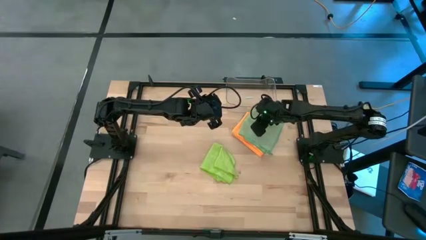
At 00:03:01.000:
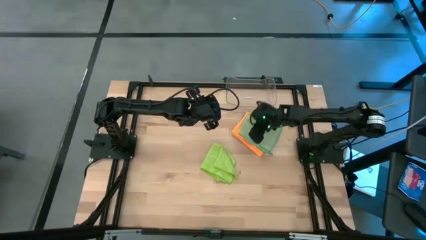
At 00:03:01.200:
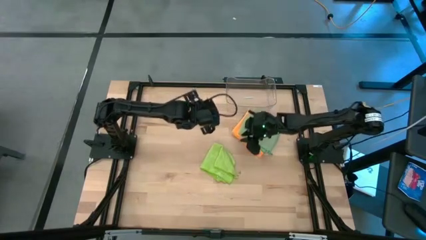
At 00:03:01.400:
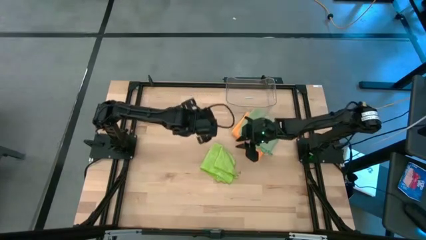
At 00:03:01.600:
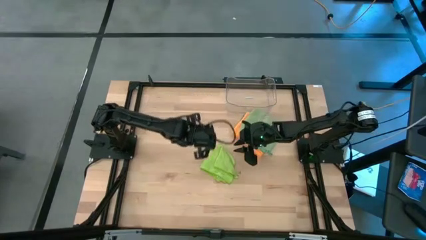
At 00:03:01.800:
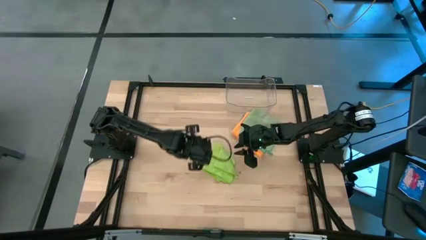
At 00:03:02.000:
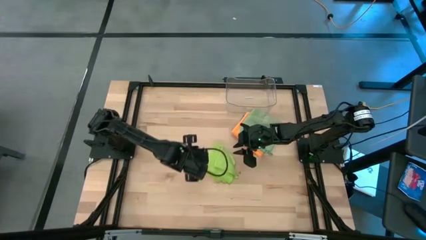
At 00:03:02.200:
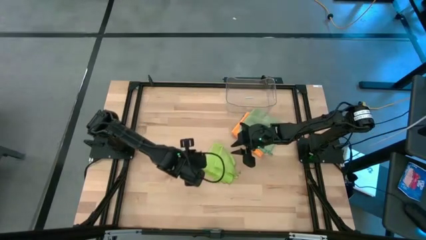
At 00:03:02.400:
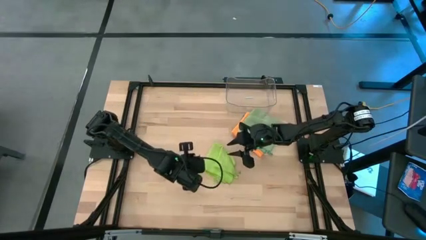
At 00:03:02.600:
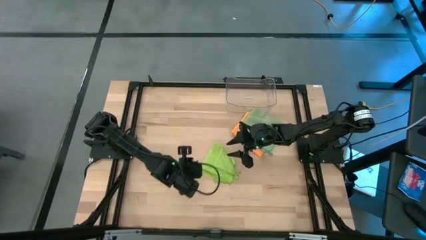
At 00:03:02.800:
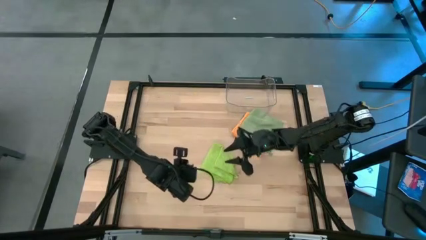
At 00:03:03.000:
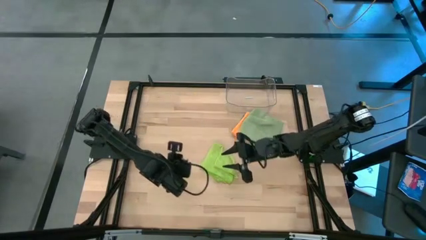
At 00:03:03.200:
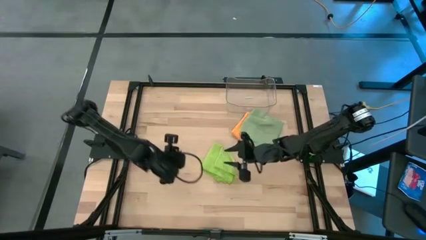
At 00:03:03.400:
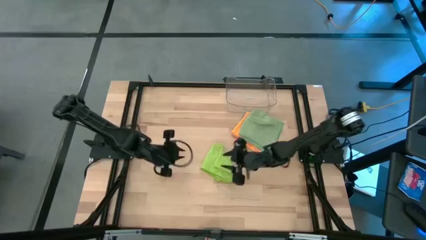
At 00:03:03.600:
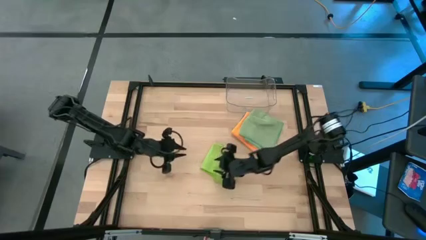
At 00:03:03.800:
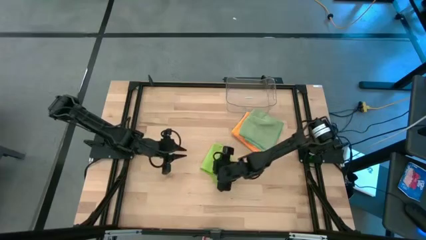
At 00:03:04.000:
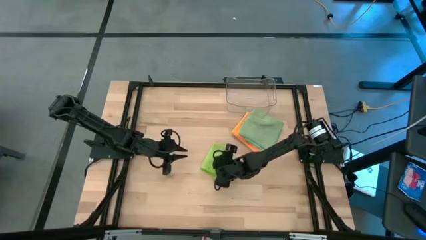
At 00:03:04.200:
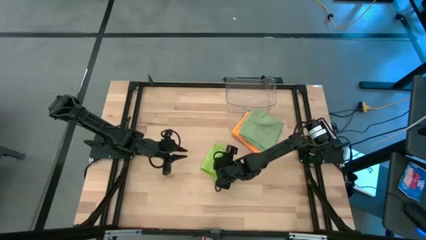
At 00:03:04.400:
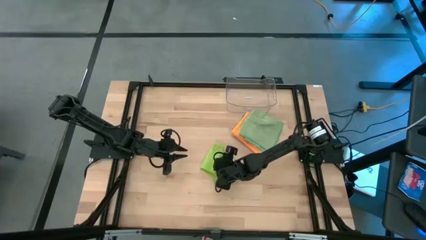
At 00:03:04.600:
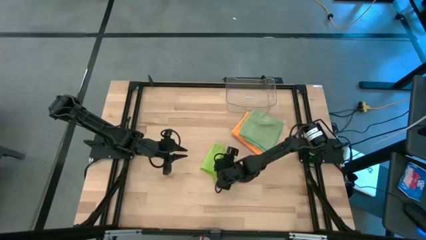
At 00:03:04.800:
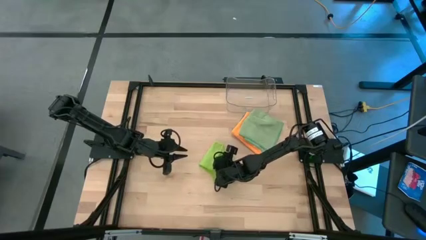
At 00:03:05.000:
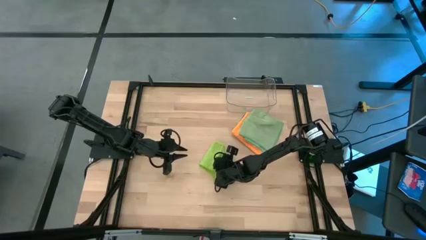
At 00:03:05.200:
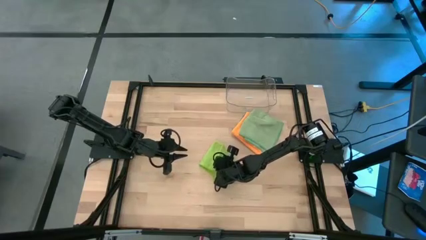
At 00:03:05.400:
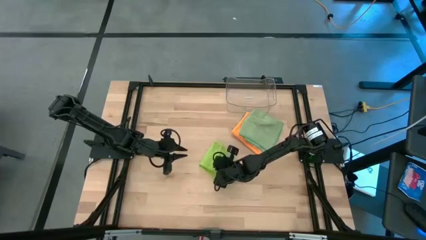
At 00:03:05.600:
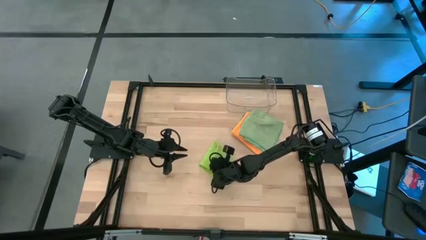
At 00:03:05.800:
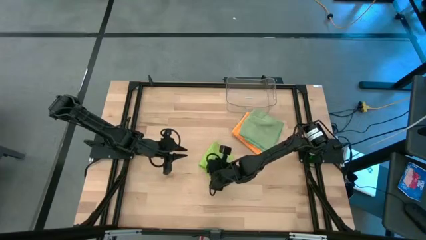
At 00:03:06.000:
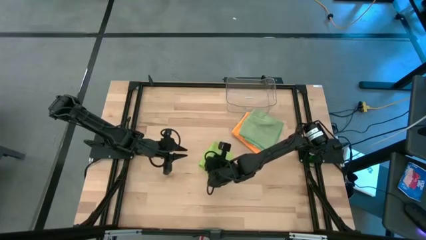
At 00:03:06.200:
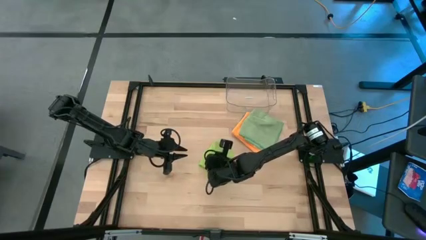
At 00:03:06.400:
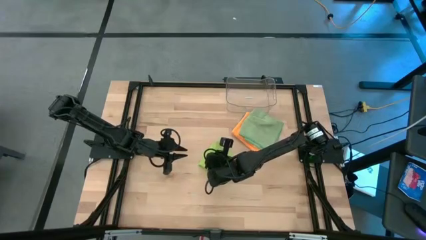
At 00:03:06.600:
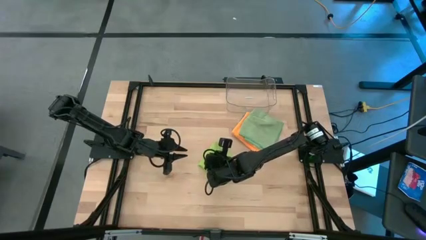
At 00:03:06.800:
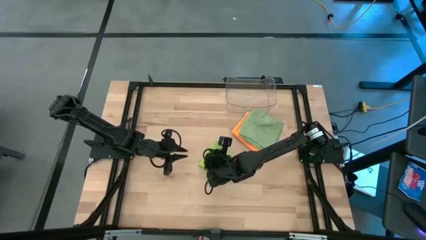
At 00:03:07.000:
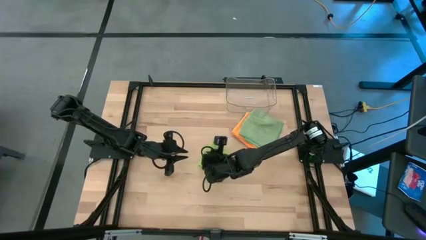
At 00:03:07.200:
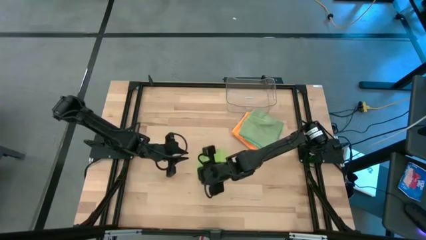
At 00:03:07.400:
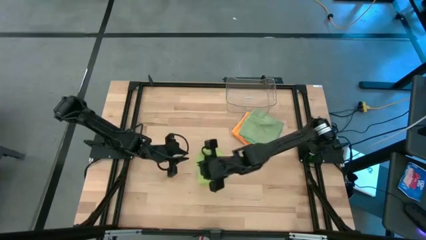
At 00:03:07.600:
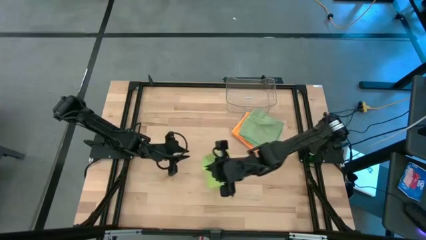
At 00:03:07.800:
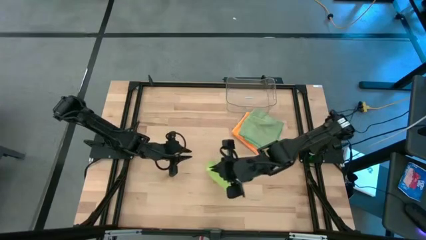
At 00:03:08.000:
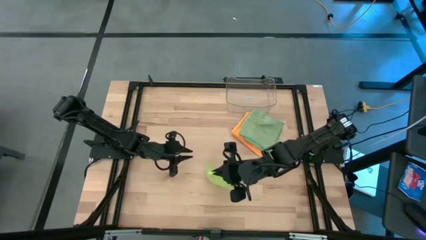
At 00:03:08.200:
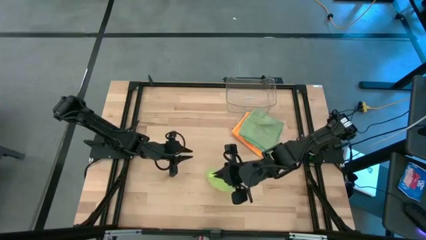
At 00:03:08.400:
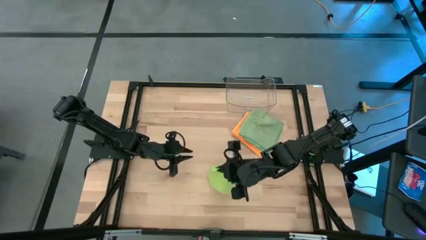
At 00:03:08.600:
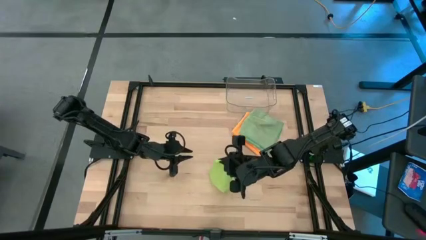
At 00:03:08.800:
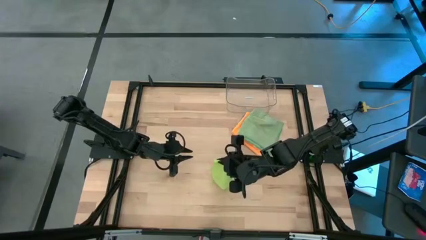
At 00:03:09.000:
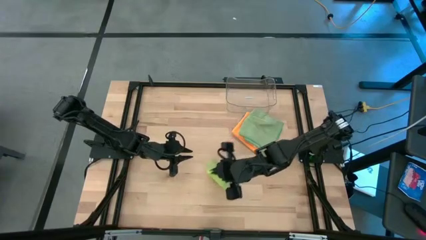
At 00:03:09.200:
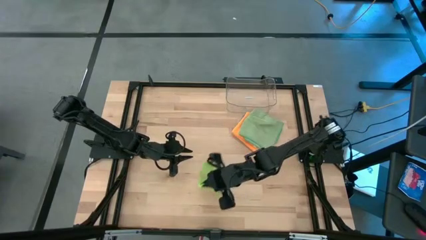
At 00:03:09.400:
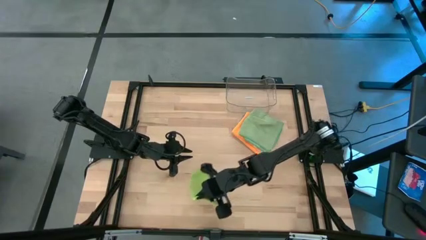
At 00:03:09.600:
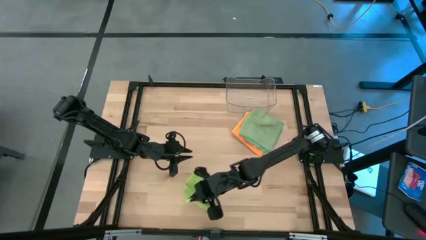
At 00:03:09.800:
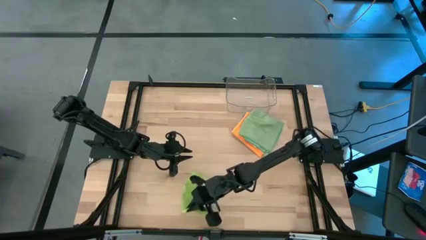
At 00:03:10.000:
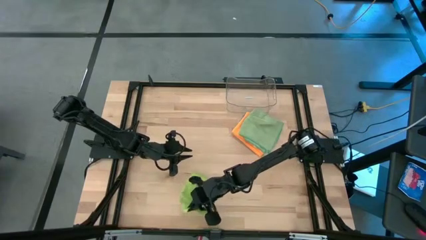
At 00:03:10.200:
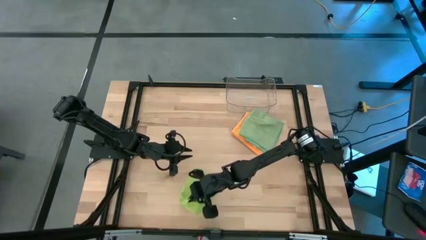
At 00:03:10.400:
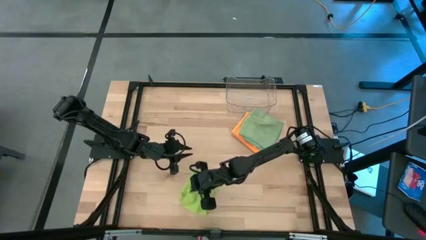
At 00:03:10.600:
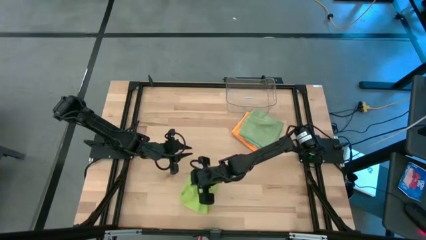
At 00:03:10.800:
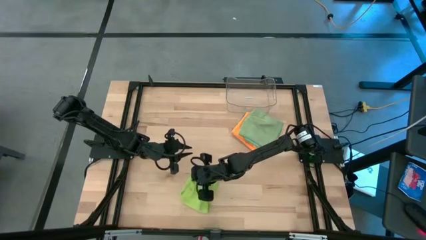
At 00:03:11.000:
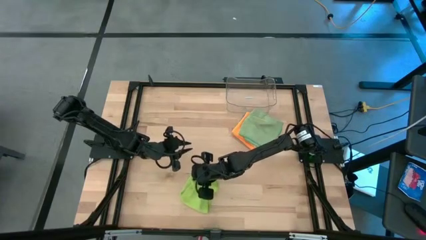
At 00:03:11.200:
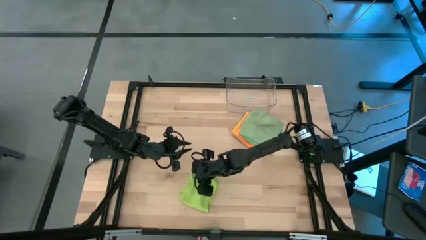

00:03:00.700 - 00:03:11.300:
Task: Fold microfiber towels
Fold the light green microfiber cloth

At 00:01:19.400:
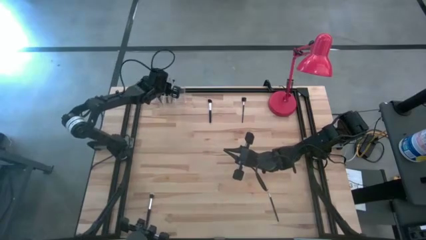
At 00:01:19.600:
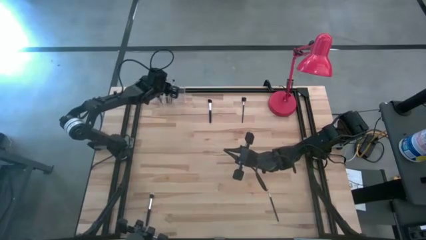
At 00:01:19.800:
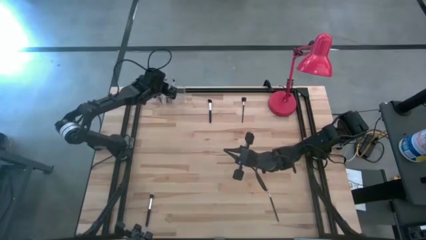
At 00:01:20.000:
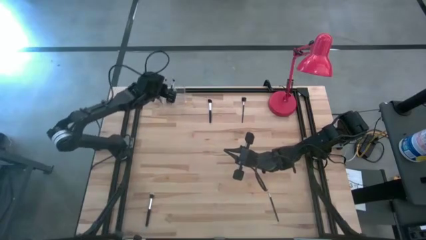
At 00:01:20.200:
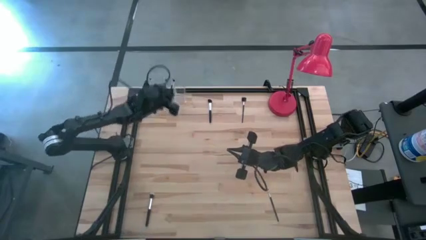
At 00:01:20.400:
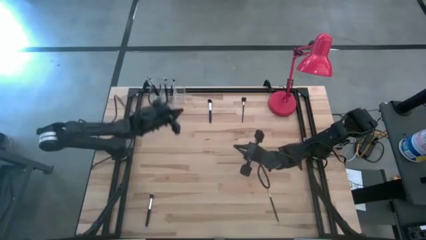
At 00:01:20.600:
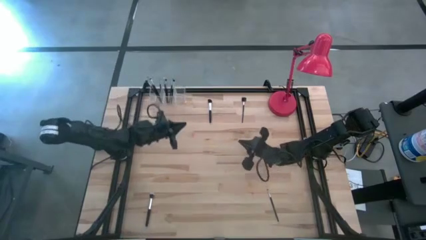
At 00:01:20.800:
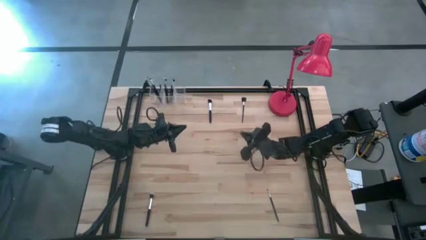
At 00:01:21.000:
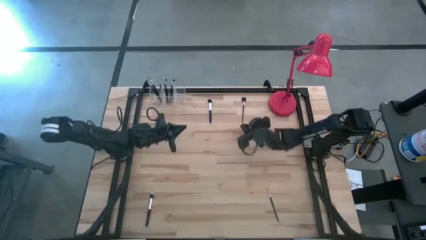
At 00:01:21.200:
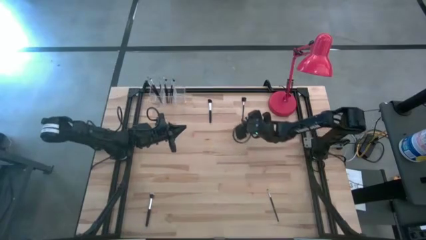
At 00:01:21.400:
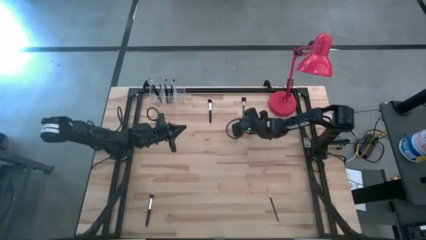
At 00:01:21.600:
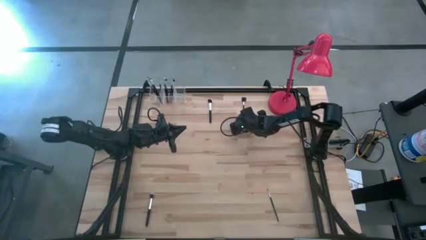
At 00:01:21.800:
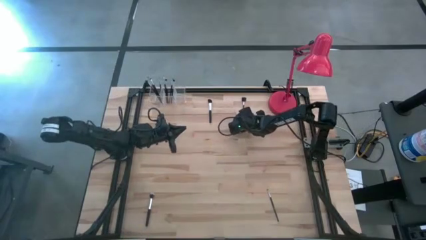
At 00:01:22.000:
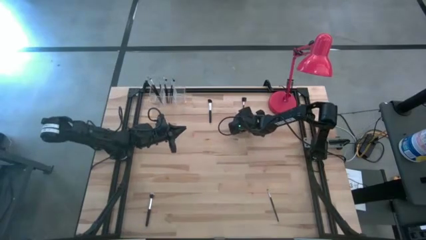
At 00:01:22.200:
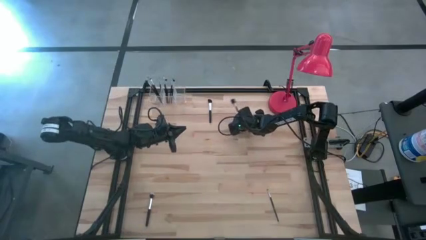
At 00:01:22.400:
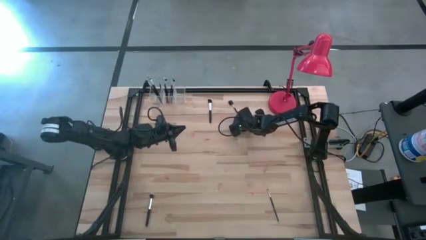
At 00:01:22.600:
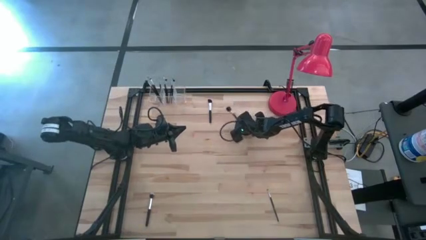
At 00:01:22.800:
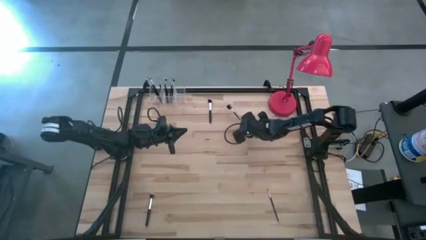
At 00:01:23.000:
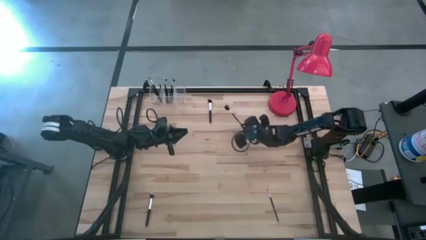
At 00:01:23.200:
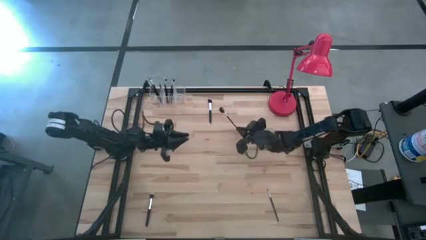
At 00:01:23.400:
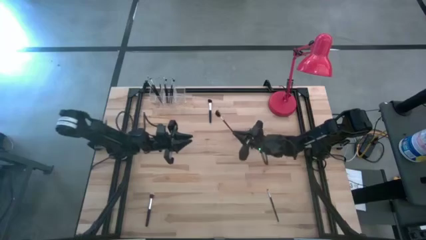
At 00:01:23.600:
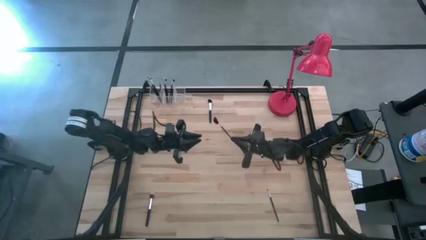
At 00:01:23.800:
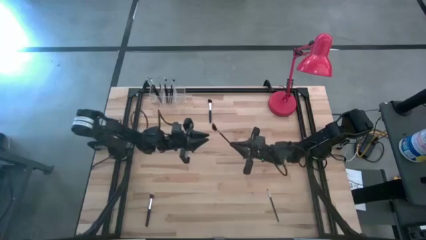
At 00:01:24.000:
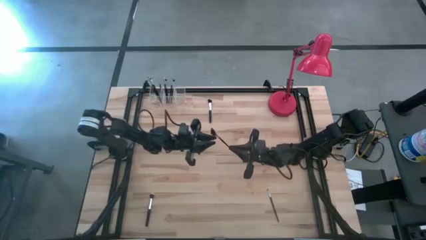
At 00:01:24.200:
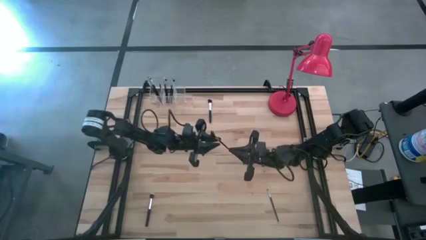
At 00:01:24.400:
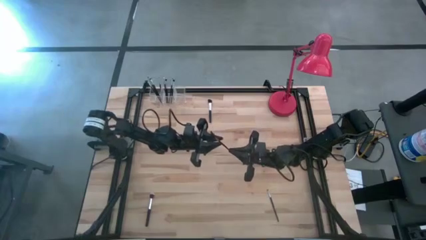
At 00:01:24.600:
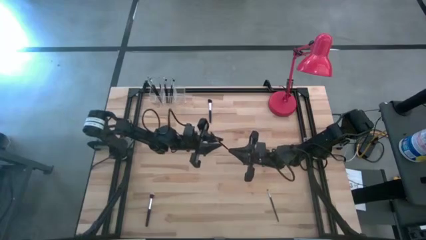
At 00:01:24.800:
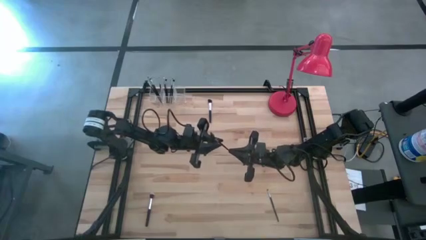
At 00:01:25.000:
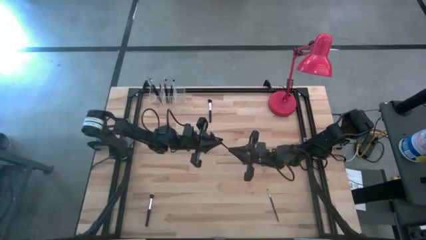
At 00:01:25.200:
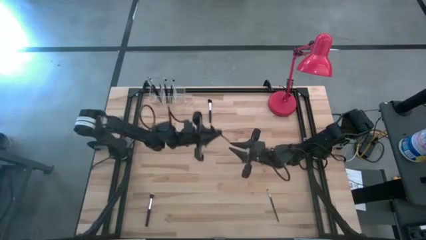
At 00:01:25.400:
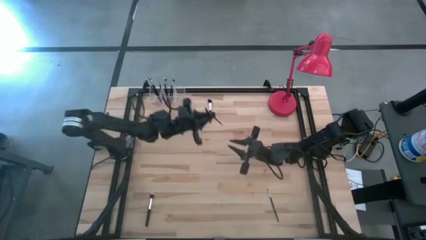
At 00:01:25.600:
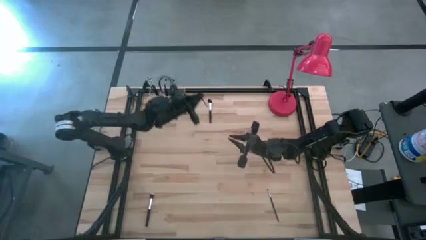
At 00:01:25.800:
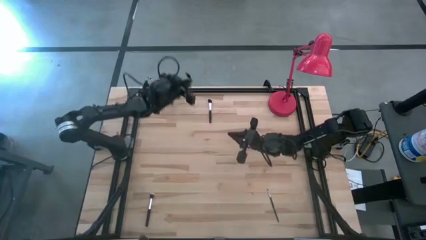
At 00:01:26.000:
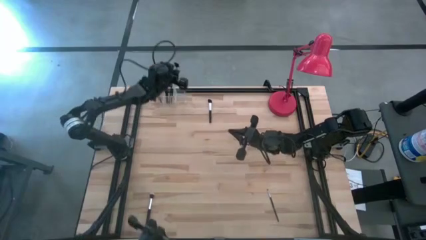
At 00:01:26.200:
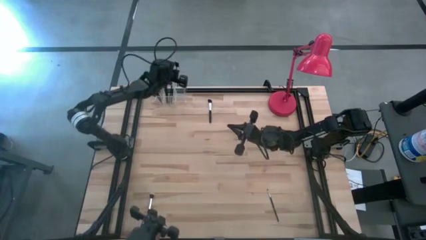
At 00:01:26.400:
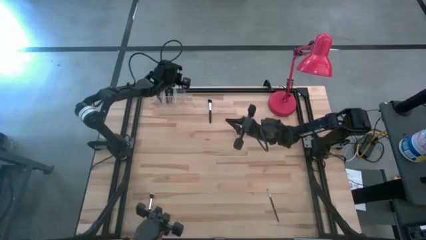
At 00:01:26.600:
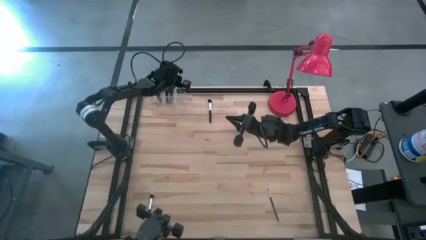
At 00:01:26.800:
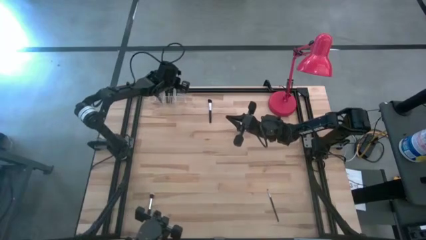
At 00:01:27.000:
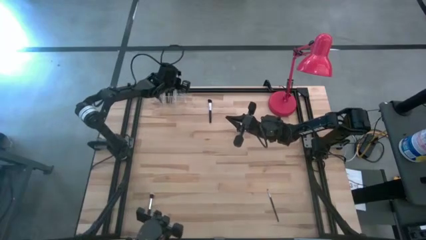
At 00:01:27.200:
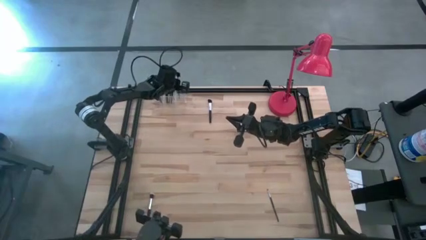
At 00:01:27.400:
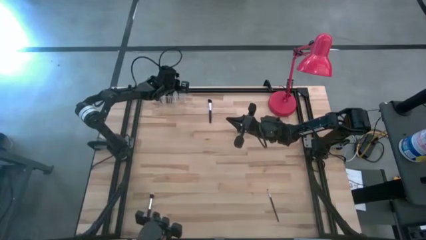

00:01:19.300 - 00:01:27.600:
Task: Pick & Place Makeup Brushes
Put the lash brow comb brush into the transparent organizer
